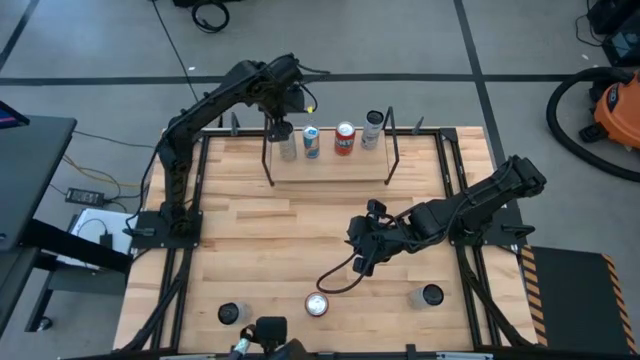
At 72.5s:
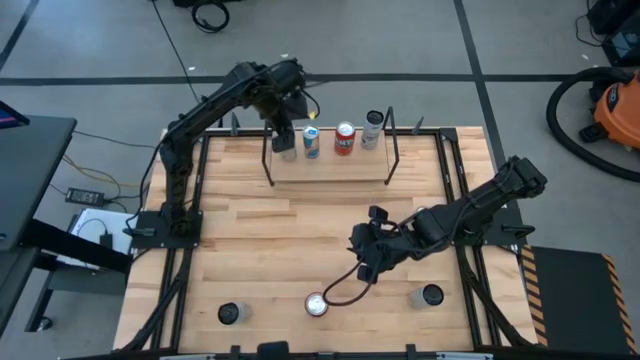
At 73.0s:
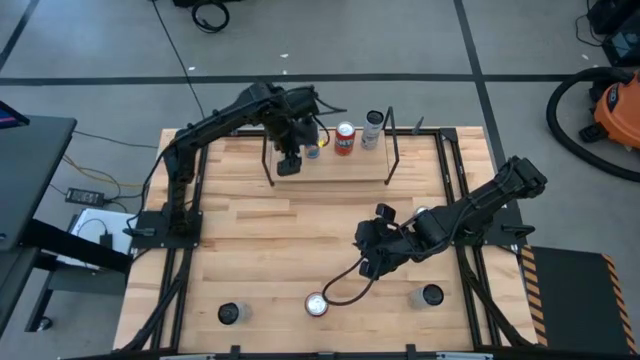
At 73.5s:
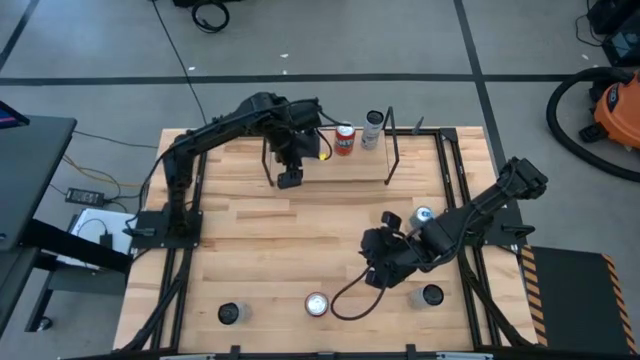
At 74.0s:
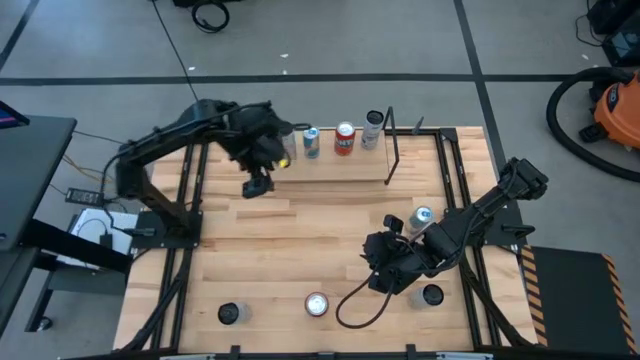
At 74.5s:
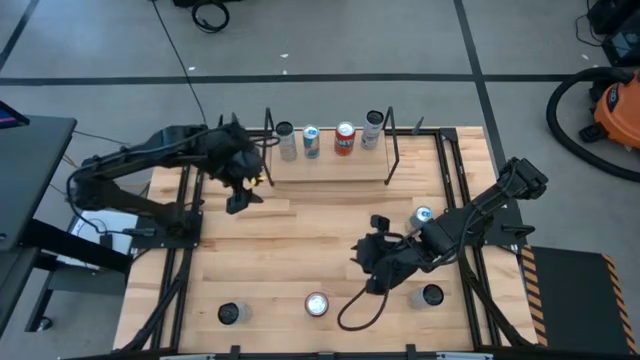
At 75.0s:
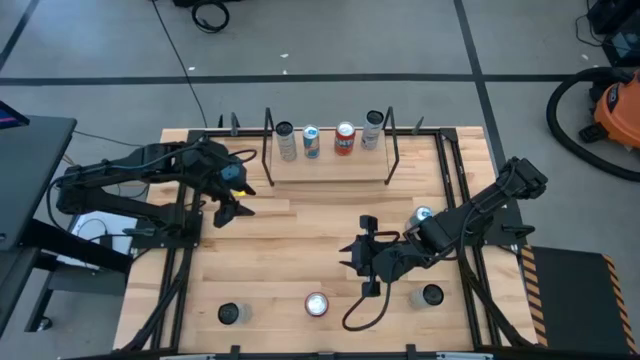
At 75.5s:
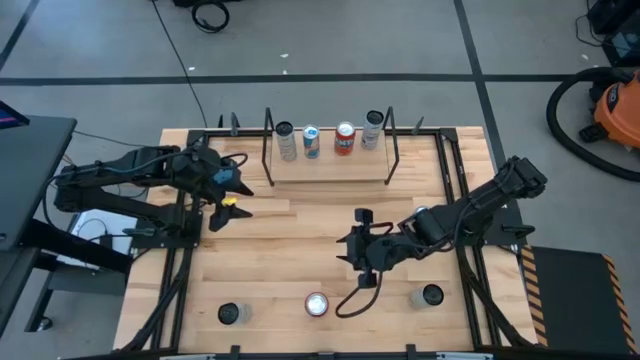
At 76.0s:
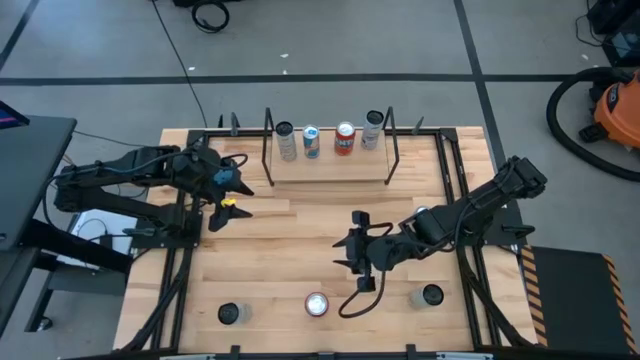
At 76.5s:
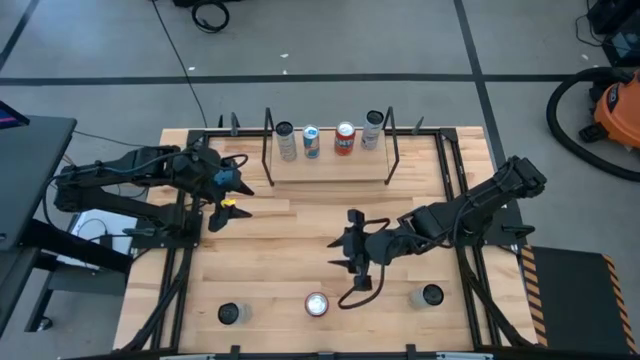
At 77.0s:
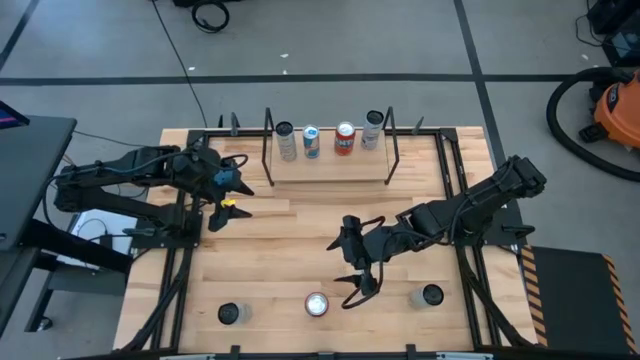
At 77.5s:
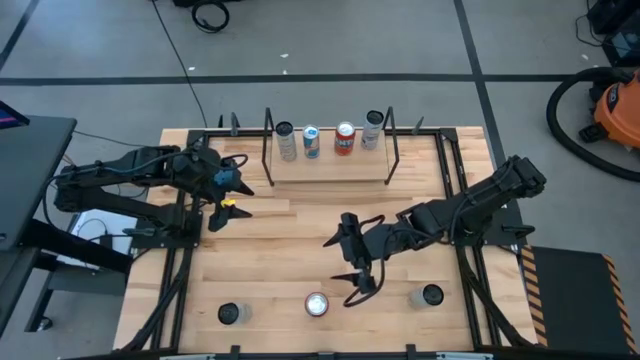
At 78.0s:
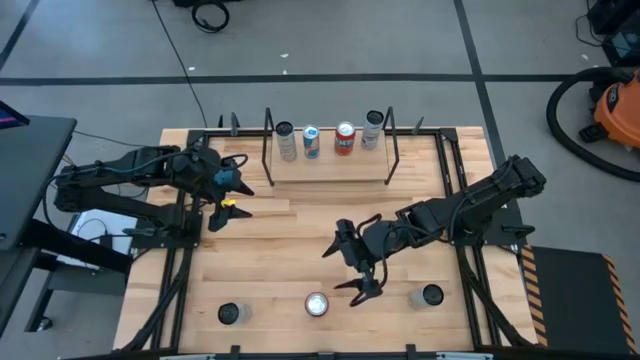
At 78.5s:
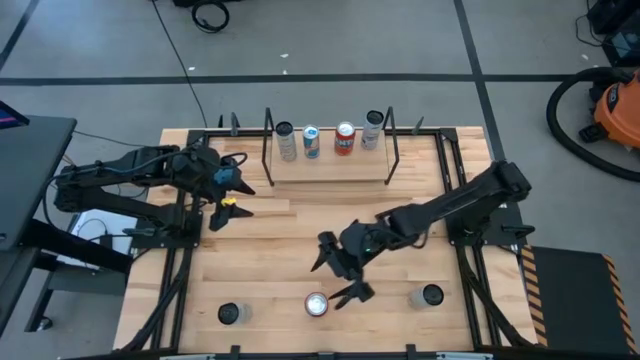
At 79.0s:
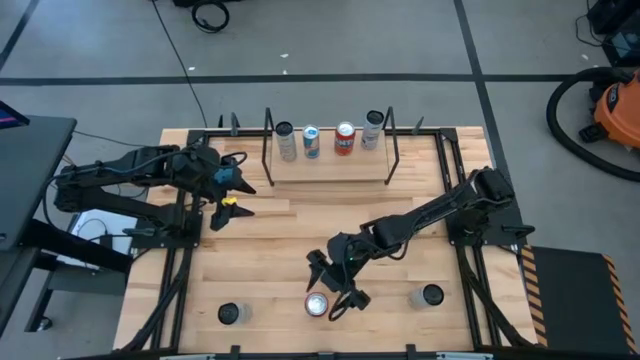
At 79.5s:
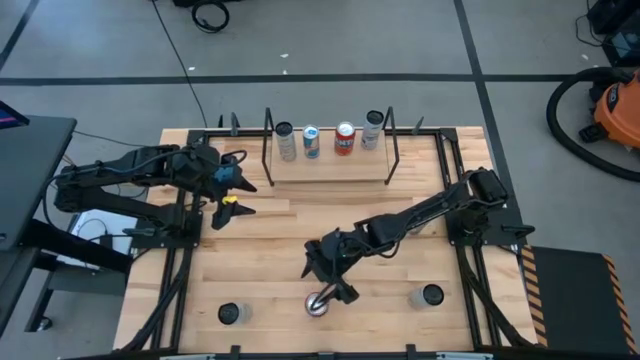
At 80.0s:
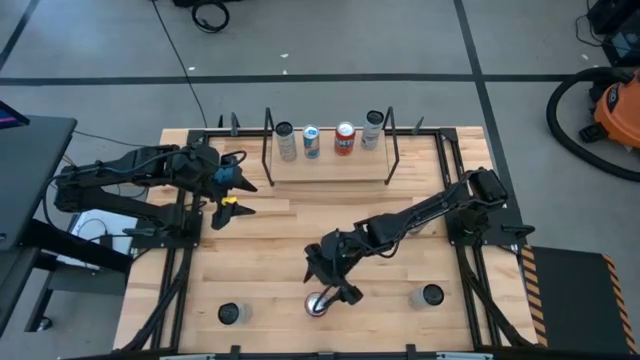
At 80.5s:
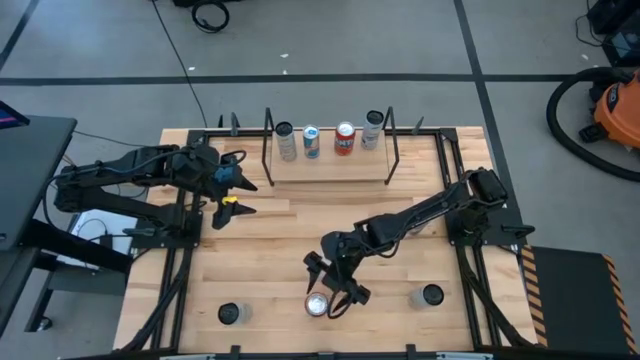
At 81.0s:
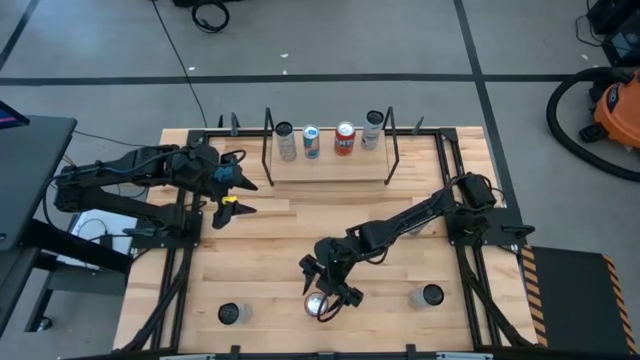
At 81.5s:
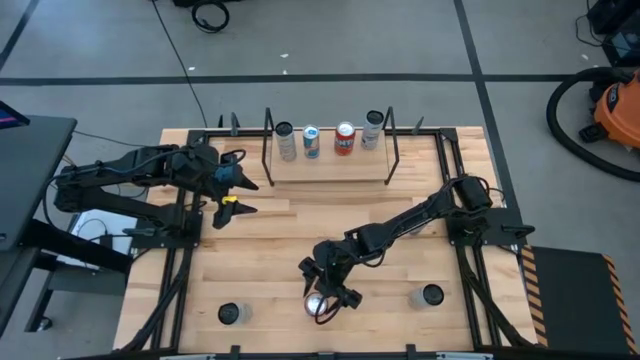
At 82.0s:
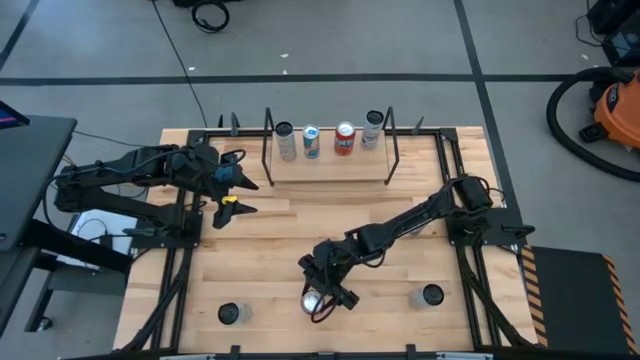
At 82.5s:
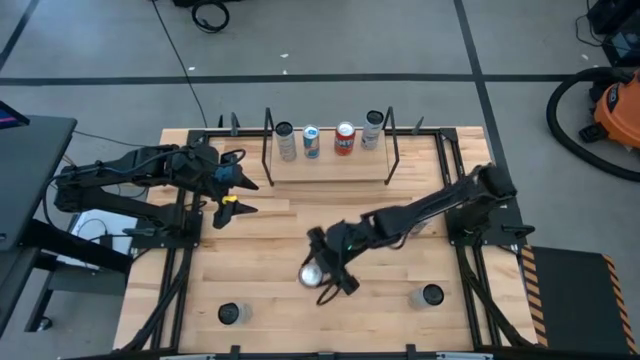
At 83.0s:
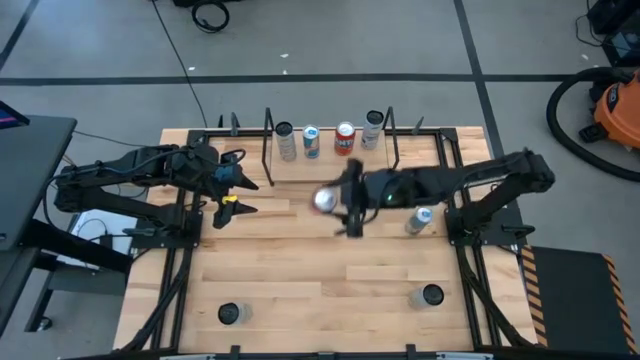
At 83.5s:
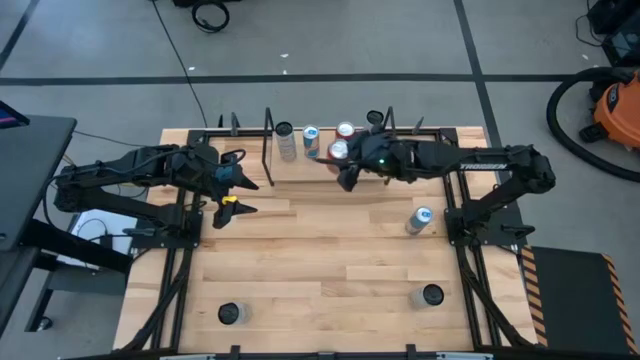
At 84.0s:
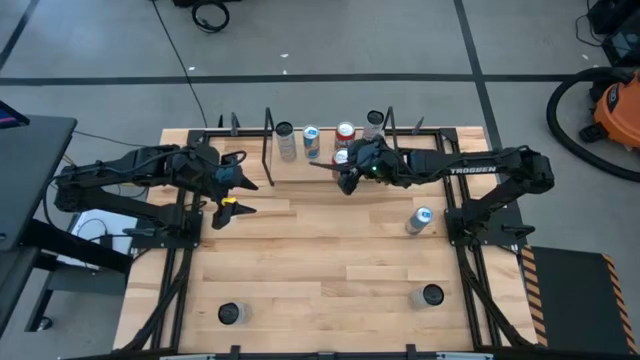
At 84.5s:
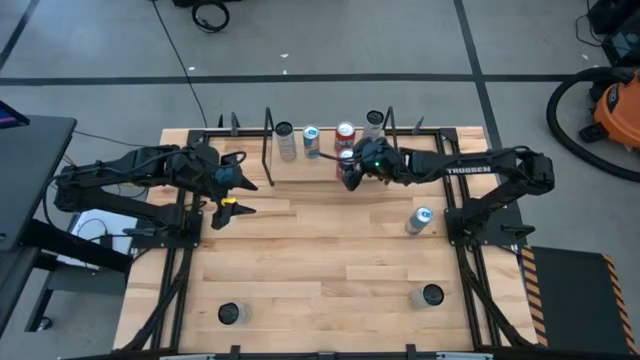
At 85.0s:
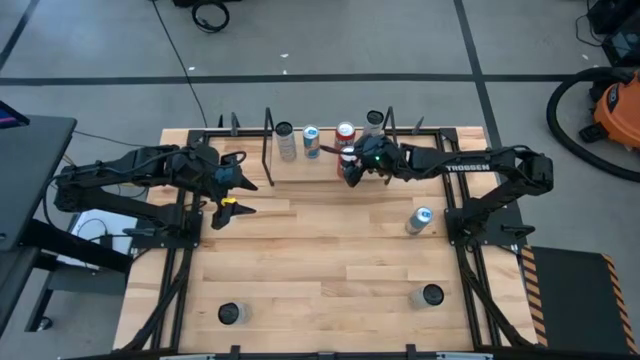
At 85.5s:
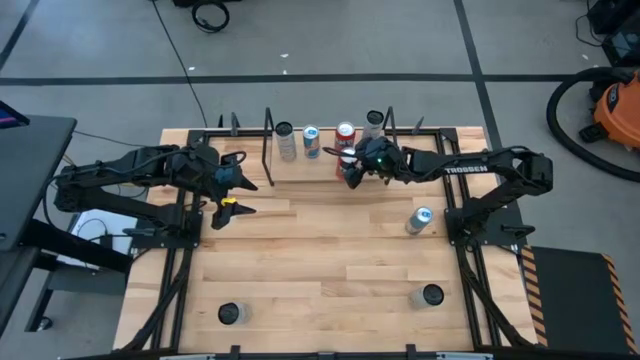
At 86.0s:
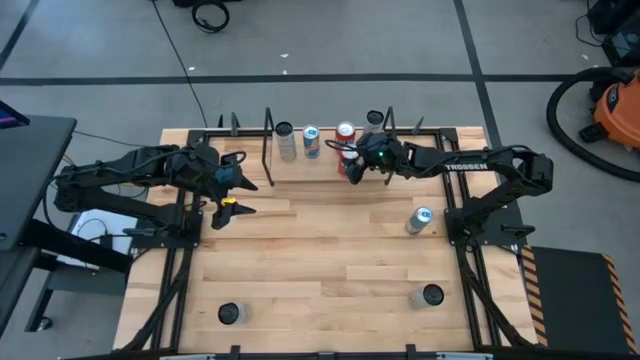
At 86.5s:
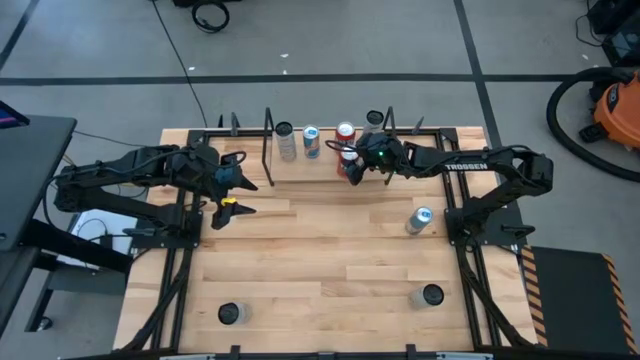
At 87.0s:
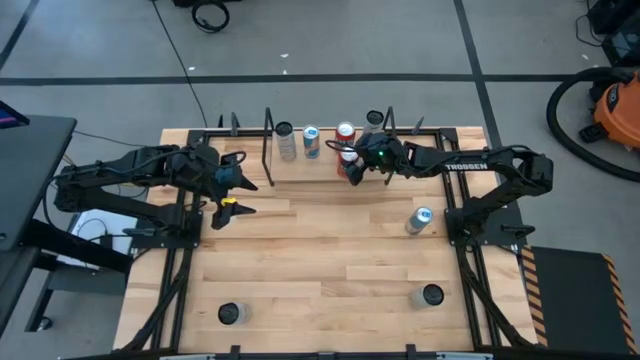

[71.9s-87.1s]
Task: Place canned beverage on shelf
Put the red soda can on the shelf aligned with the other red soda can

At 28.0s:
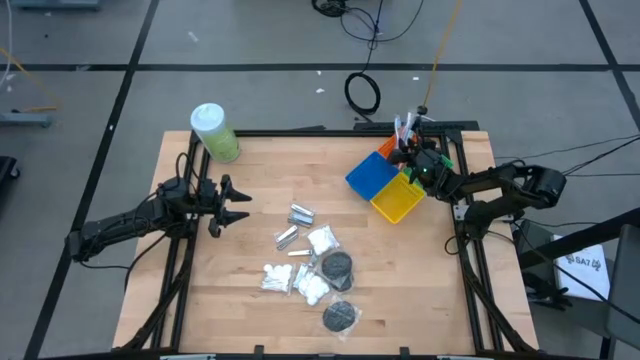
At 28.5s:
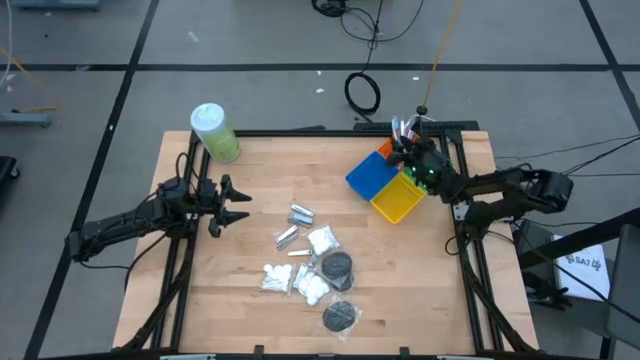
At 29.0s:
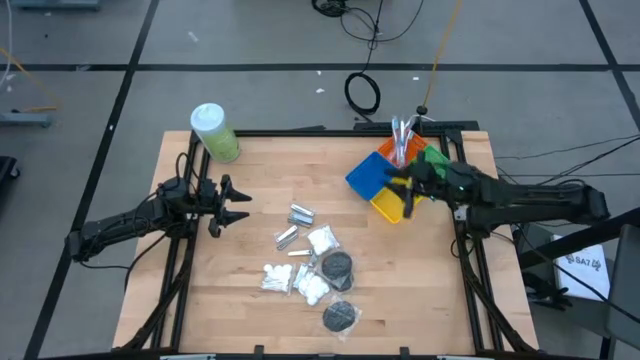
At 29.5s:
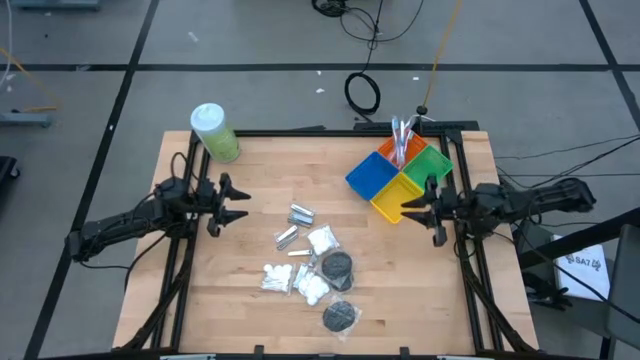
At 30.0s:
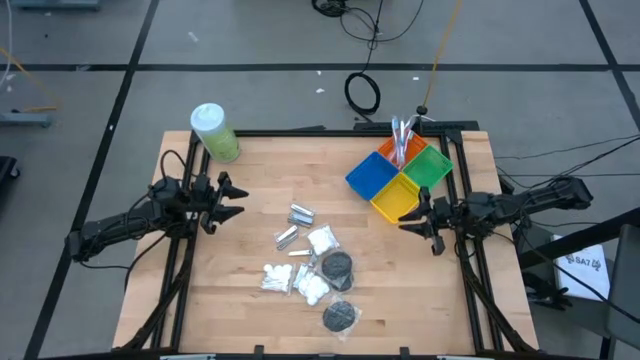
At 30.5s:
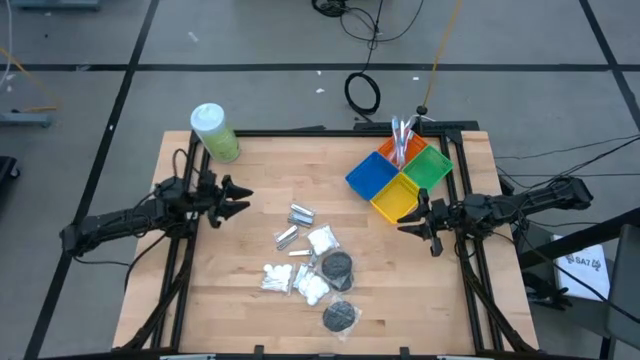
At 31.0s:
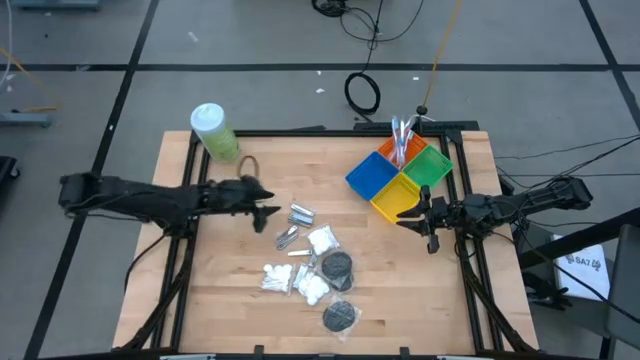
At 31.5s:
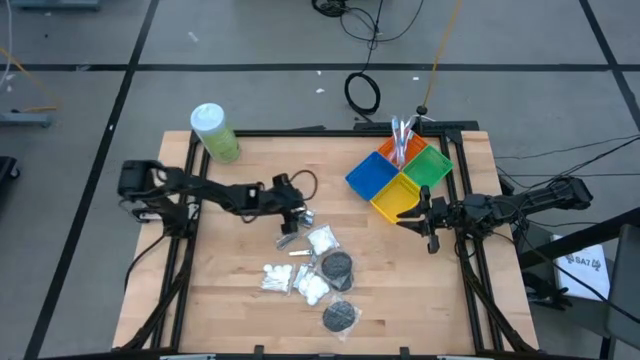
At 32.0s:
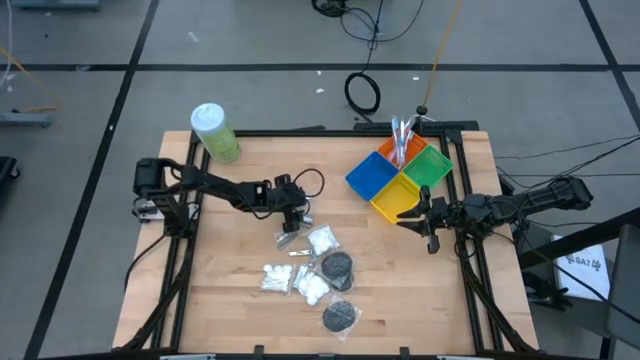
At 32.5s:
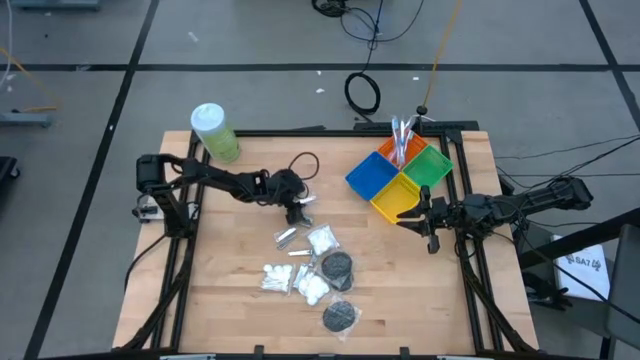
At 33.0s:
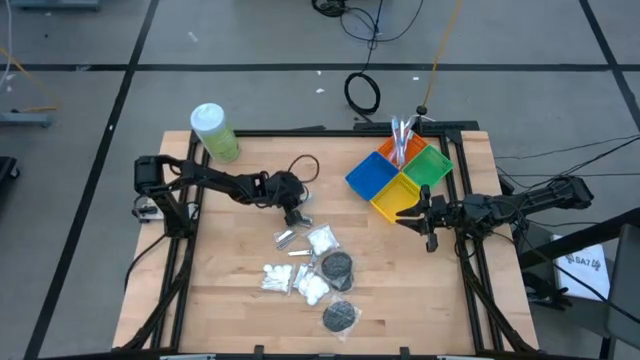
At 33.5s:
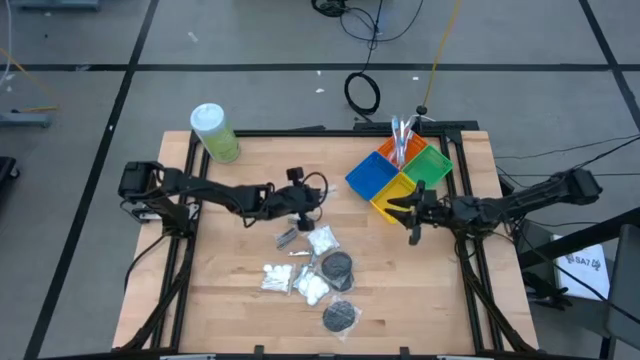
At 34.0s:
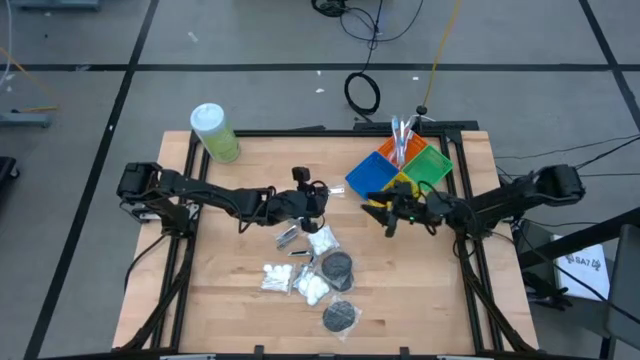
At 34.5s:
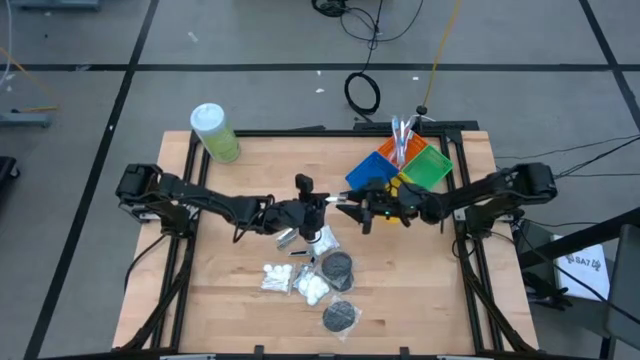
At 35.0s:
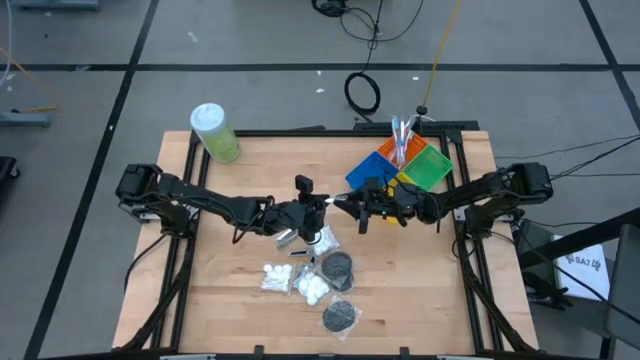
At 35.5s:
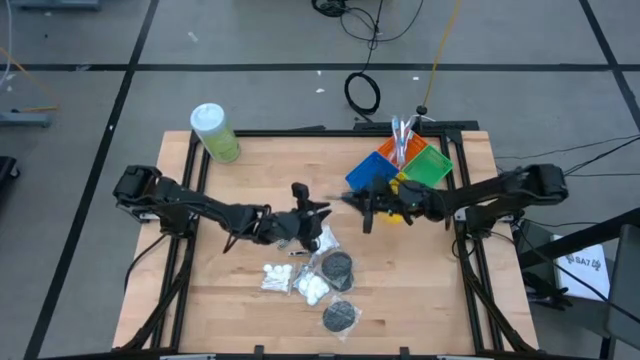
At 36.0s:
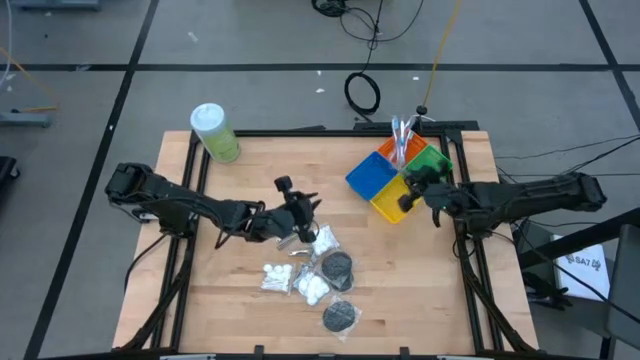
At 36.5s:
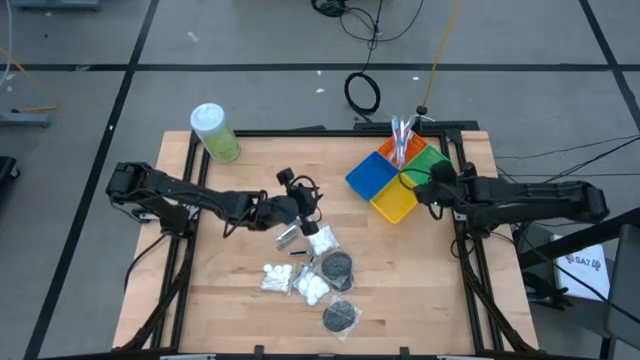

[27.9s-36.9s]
Task: Pick & Place Travel size toiletries
Put the nail cutter into the green bin
